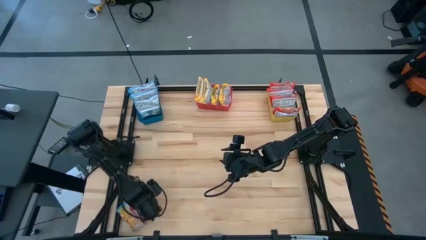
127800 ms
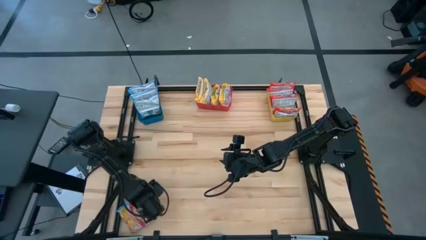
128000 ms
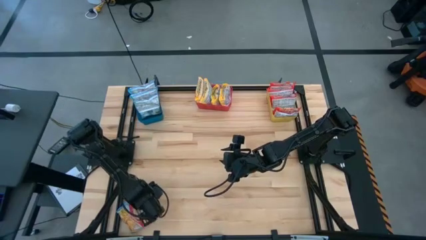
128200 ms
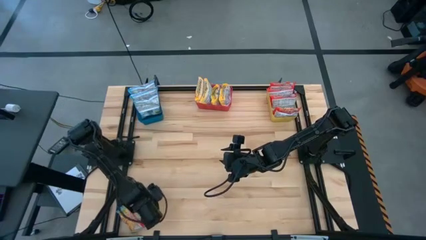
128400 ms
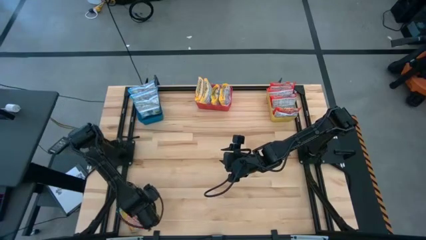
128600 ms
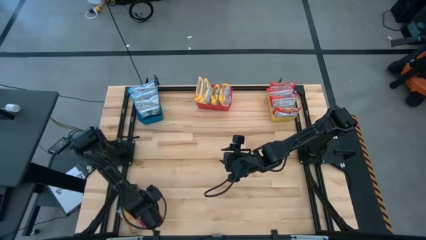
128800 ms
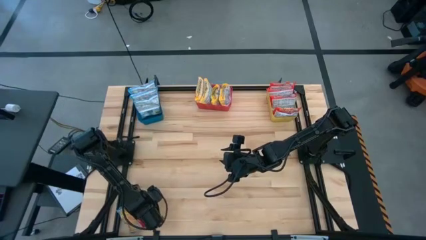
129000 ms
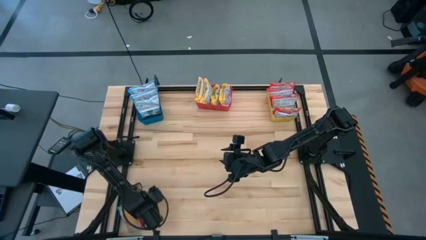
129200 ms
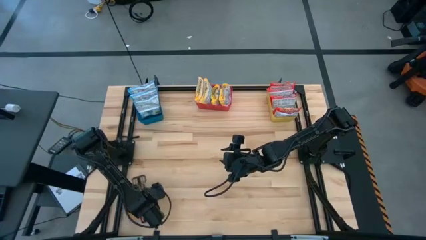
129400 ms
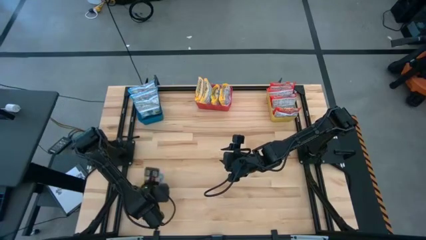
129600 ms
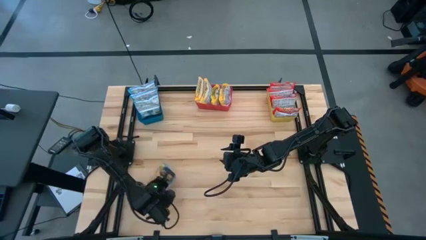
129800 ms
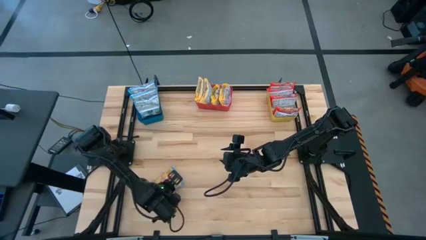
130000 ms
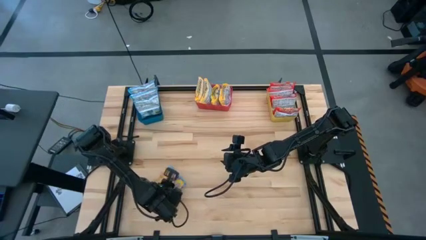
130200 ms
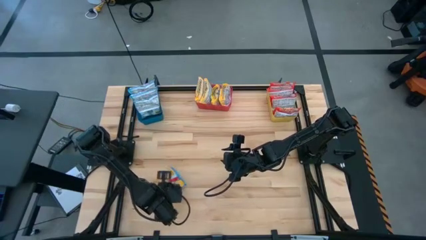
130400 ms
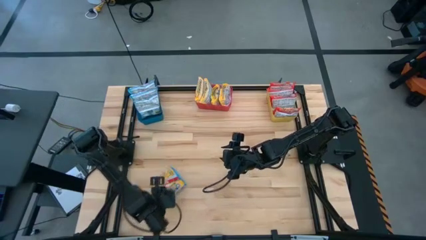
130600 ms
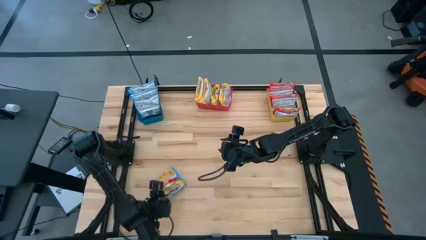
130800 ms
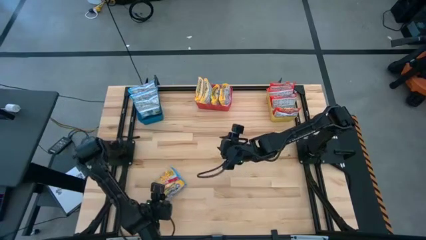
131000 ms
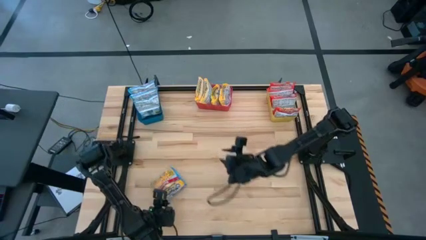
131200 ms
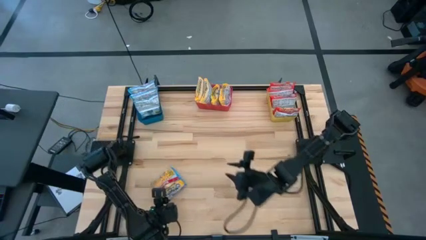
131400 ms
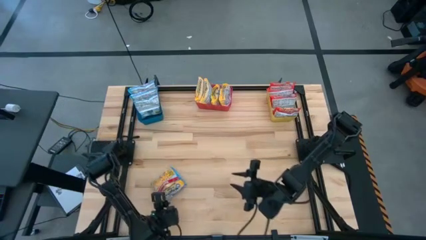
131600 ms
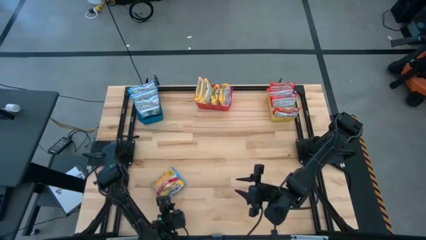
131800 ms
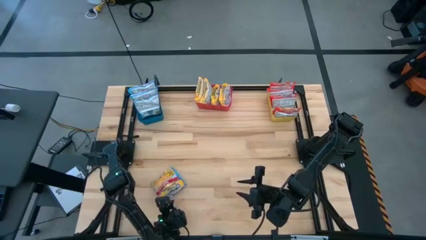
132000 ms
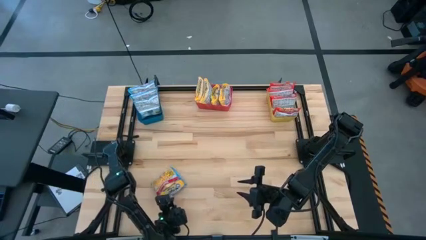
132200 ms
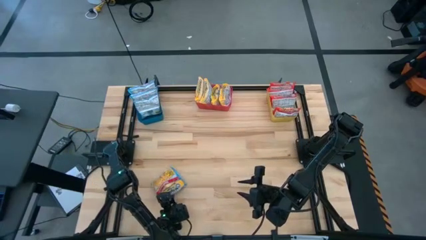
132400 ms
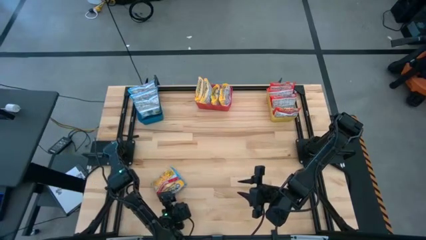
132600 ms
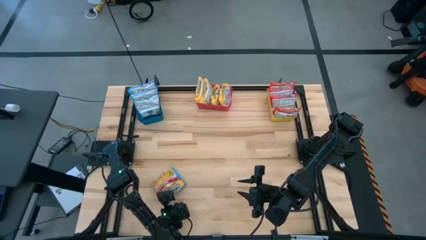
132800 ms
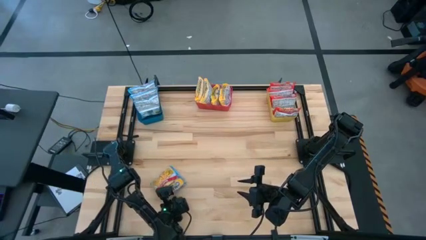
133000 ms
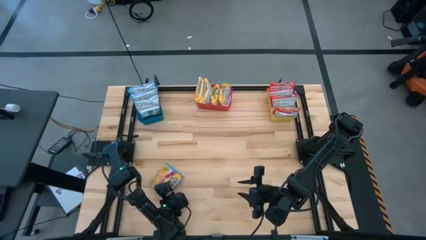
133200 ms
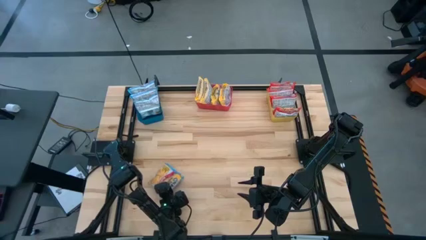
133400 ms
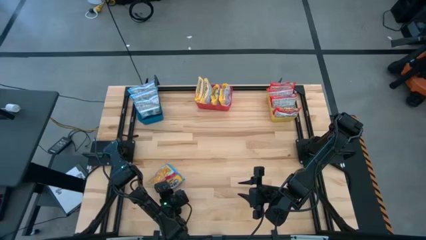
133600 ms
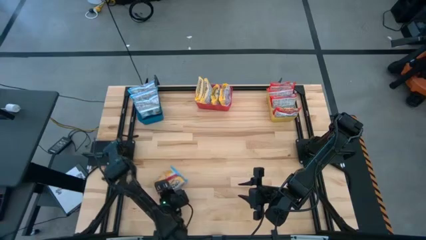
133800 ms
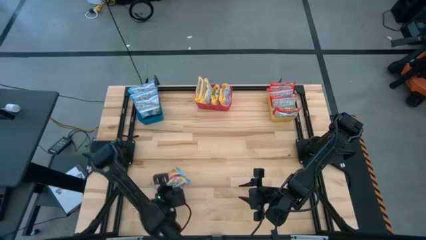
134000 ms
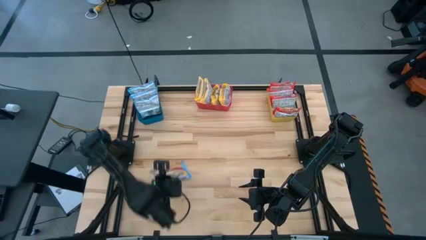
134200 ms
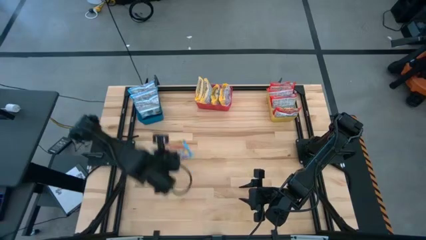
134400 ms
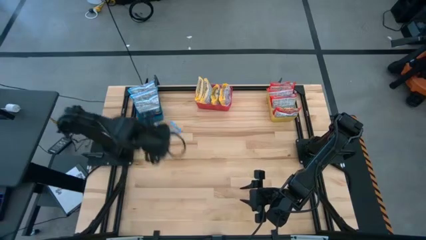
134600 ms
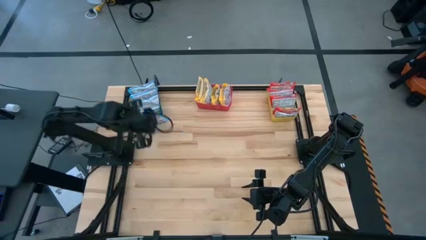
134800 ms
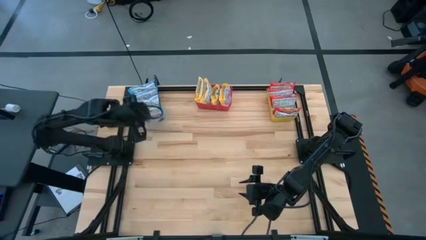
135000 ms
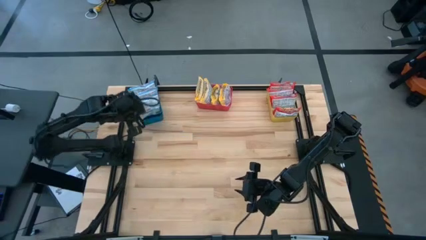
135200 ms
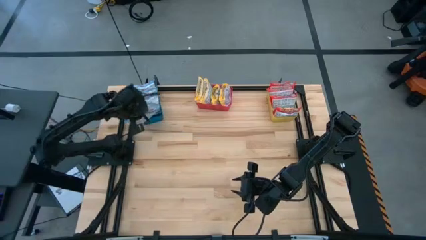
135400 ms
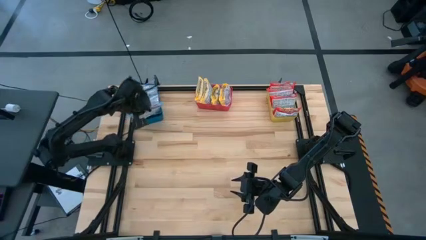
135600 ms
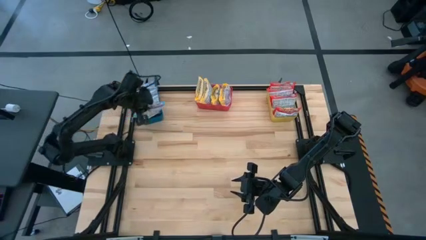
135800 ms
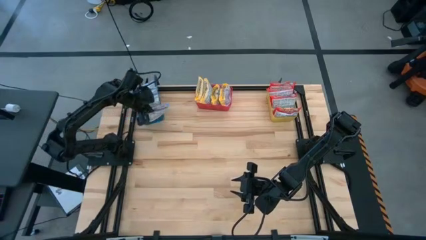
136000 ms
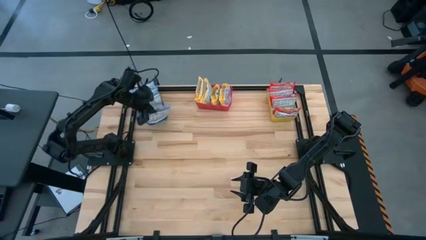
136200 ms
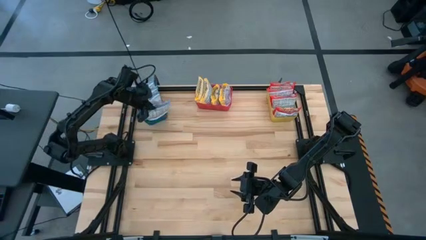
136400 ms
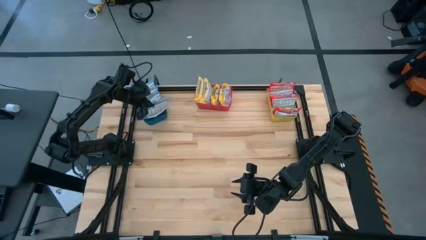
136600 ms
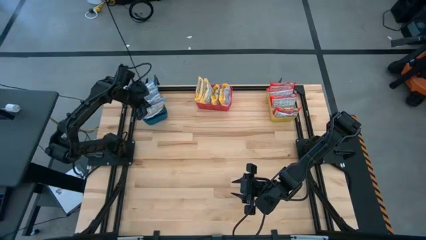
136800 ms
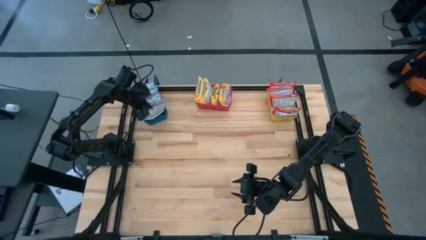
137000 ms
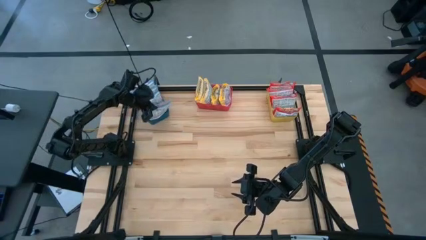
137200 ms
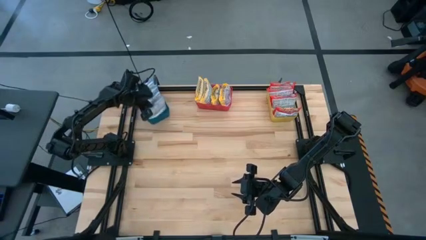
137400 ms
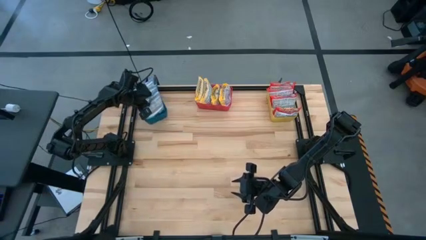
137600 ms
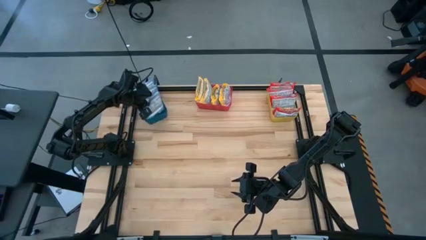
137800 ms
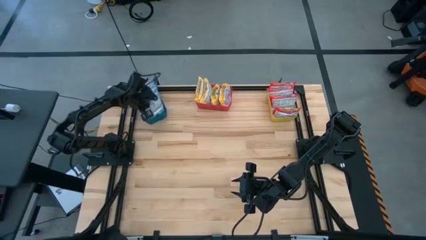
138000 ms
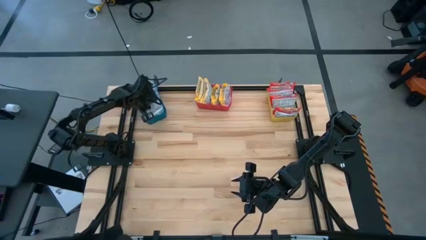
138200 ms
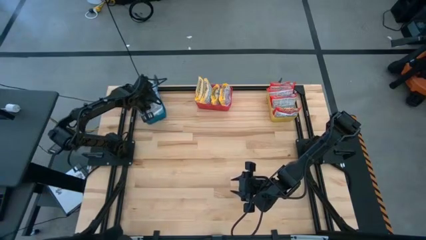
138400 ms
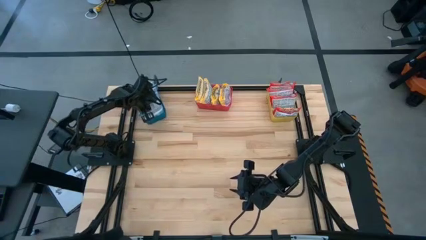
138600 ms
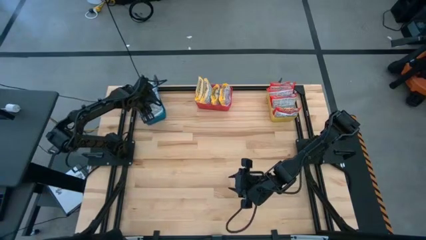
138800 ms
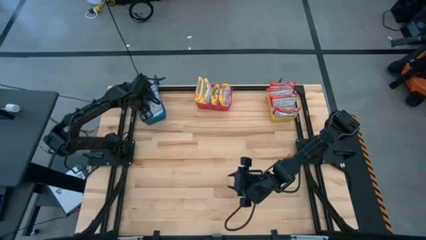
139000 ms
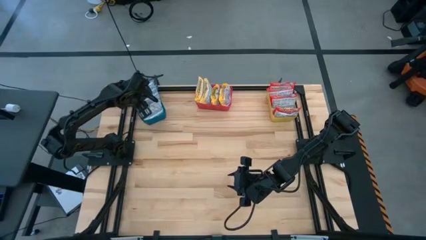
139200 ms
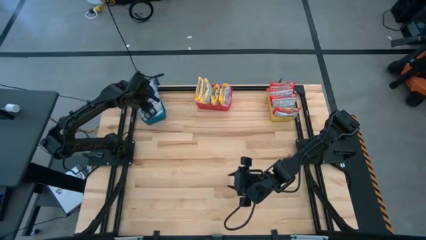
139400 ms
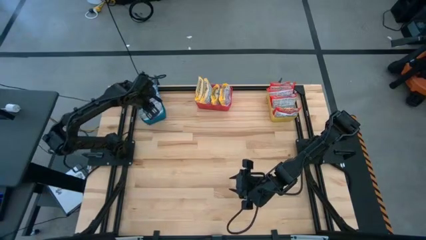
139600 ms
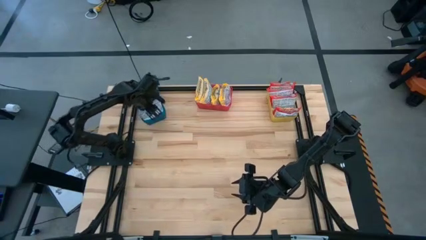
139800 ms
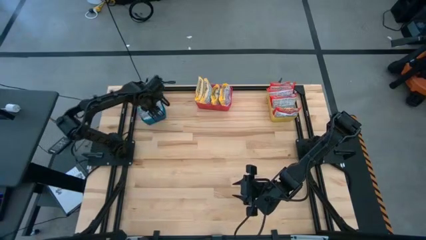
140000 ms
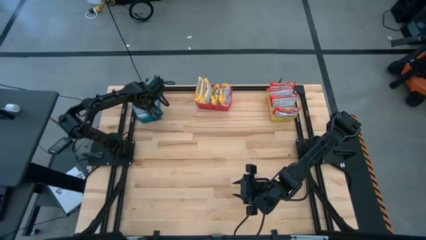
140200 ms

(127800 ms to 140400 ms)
Task: Sort Maruchan noodles
Put the blue noodle pack into the blue bin
